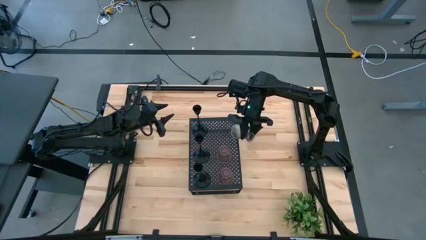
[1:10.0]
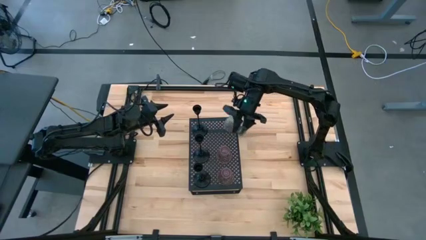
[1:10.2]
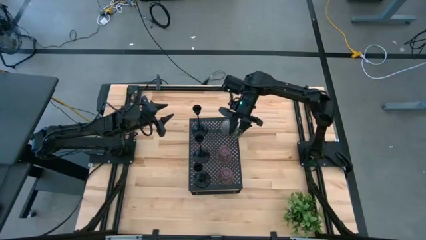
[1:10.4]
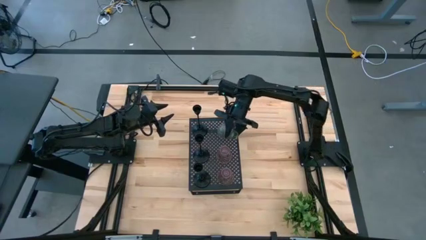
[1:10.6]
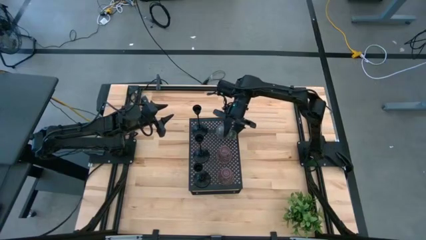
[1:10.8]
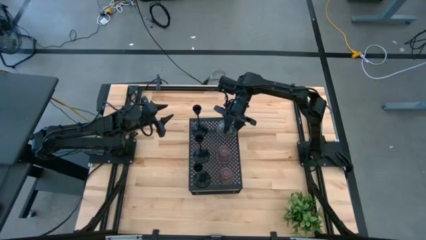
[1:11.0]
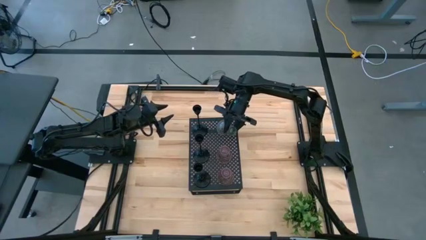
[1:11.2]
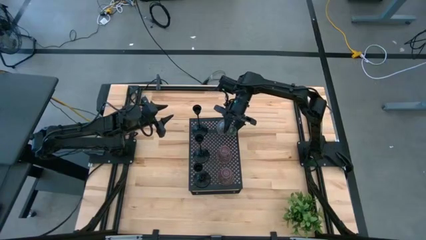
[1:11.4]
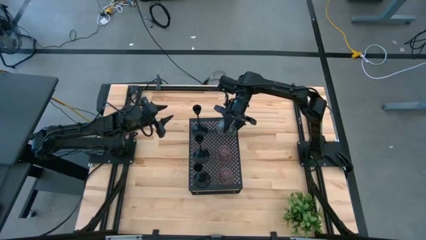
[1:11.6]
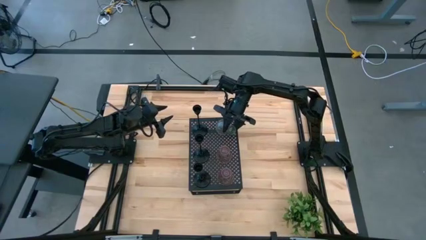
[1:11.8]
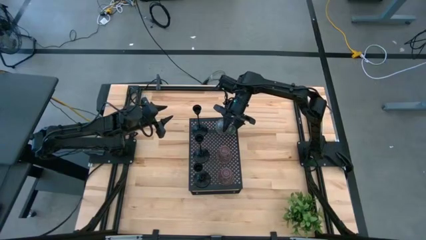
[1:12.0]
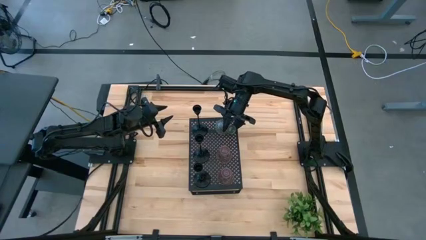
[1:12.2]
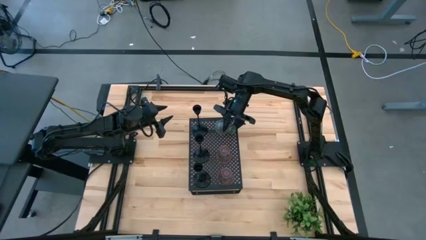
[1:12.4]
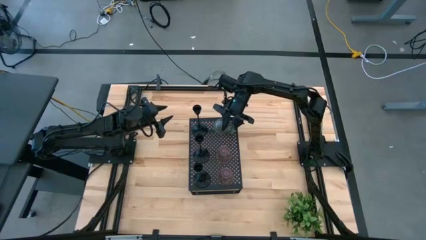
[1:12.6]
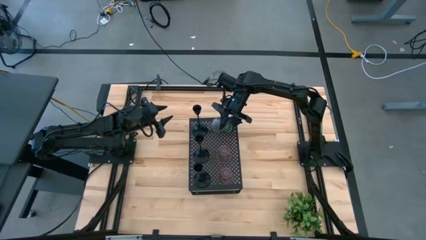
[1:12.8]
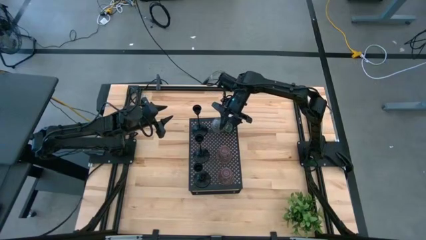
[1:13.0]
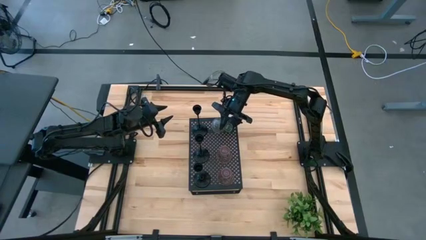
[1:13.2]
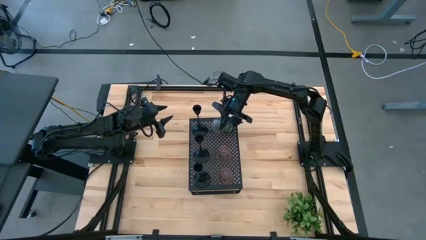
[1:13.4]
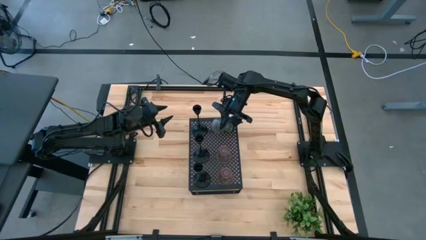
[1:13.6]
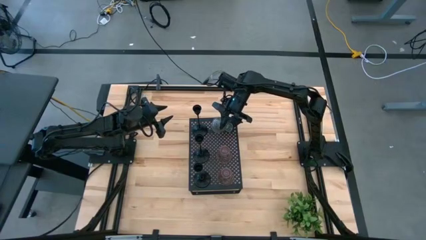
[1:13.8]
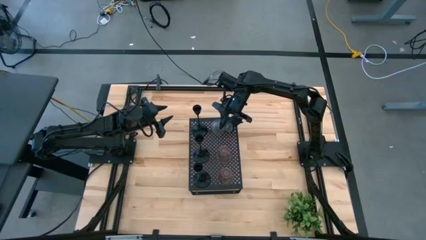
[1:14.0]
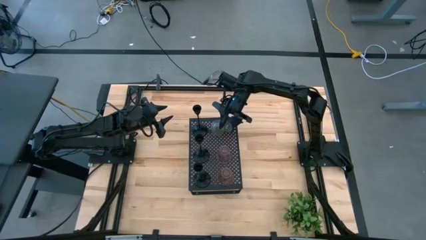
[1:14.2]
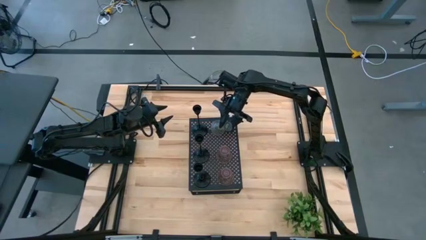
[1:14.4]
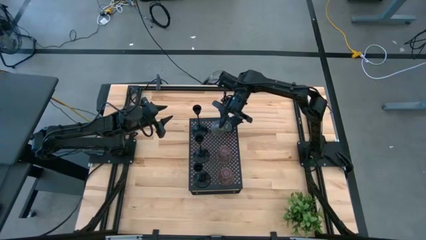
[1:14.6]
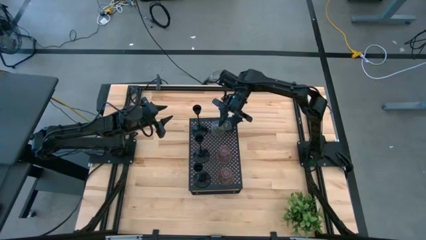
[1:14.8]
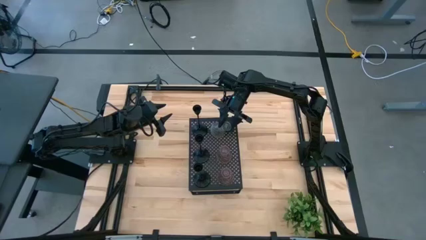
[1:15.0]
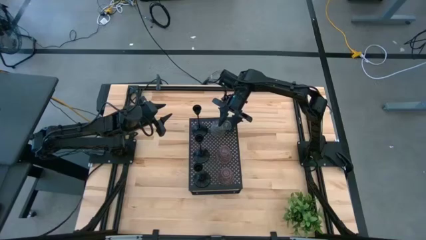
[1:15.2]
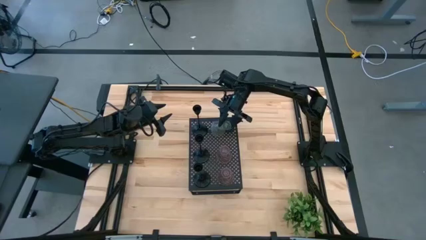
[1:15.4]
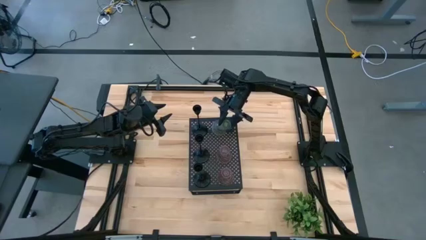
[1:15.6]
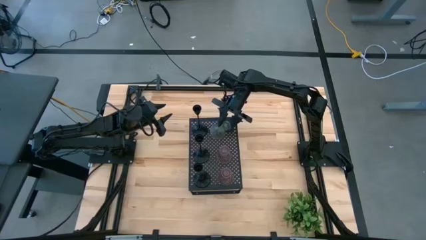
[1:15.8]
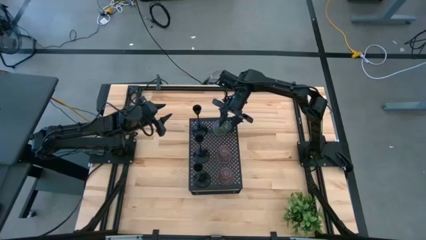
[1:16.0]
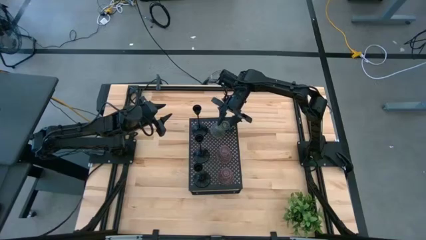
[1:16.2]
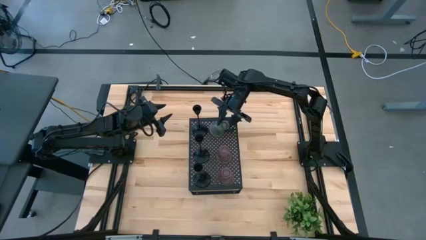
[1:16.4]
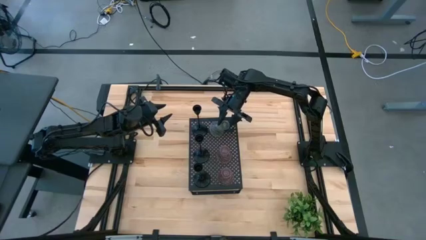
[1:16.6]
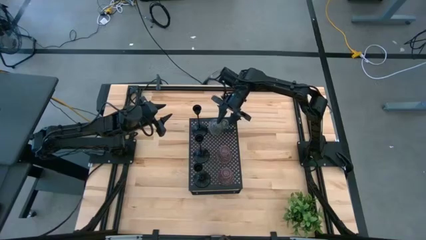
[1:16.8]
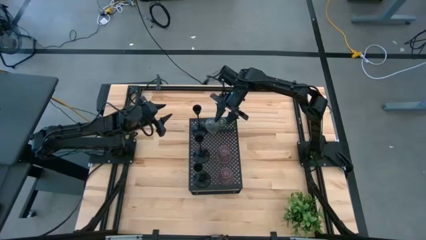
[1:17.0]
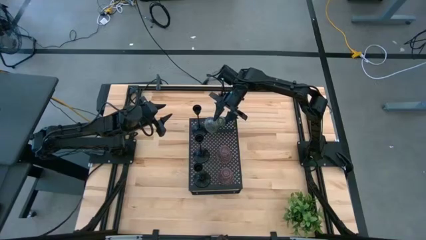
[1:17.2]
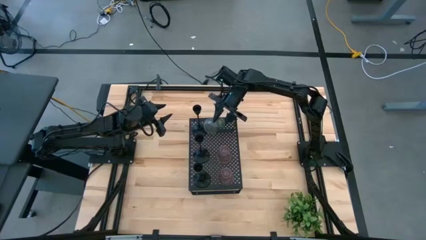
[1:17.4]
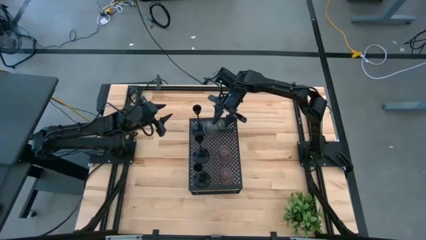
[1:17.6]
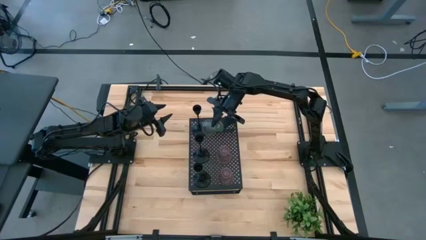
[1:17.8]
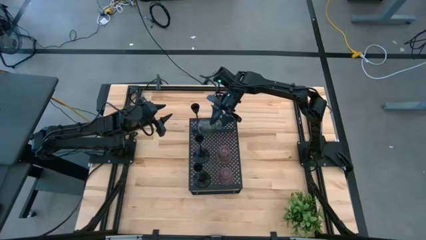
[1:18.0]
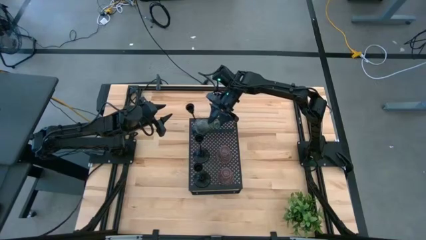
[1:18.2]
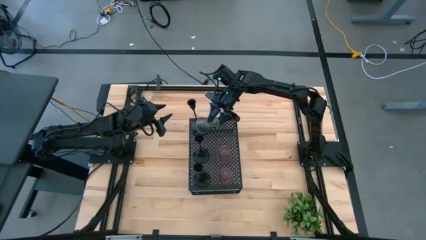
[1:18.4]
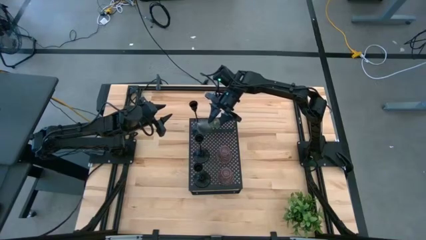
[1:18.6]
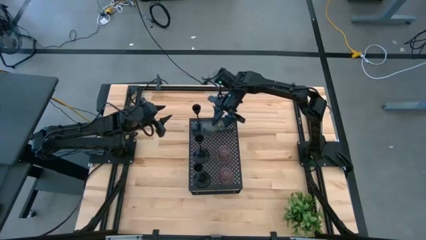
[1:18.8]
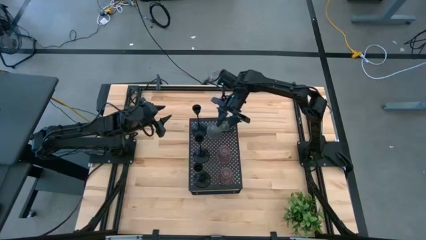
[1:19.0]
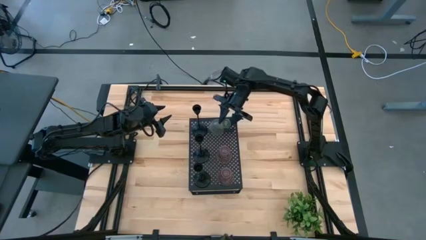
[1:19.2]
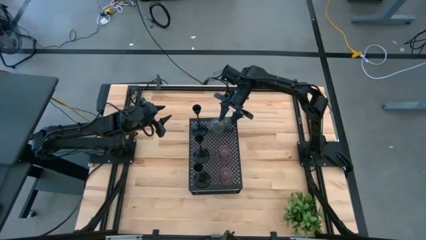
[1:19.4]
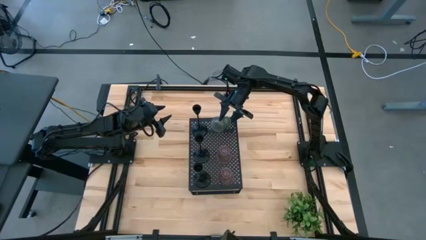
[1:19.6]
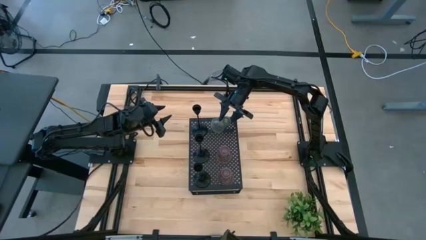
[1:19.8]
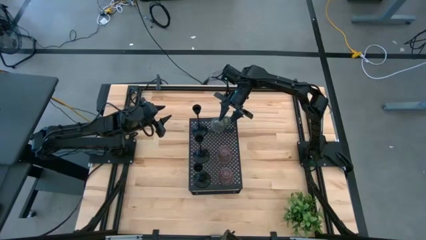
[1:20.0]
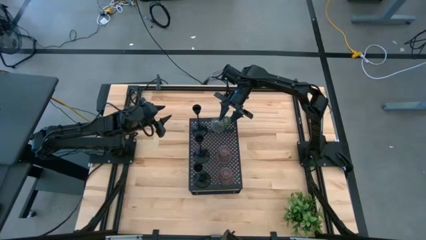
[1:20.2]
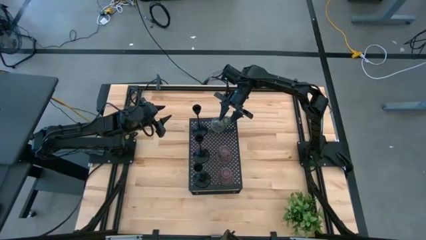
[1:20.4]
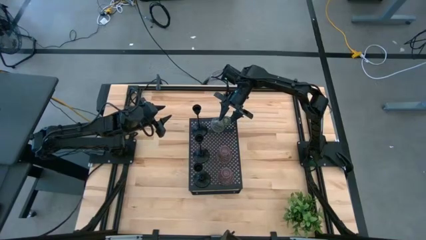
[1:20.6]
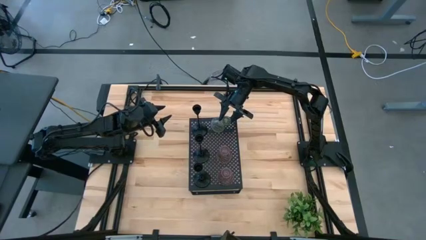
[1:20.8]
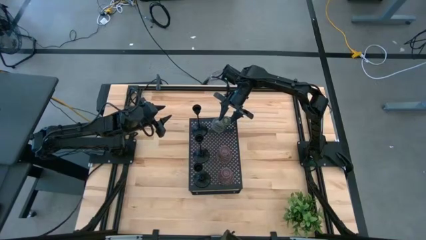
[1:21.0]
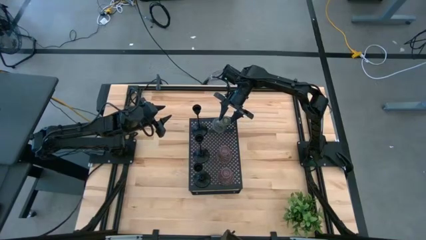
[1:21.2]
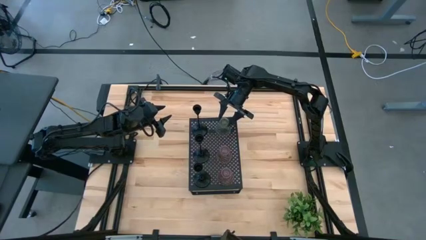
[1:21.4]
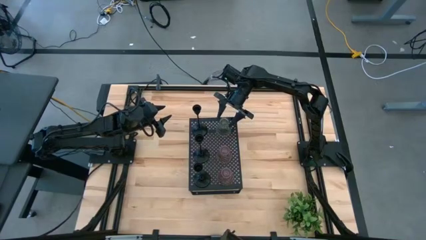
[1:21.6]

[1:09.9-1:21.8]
Task: Pick & Place candle stick holders
Put the green glass candle holder on the shelf

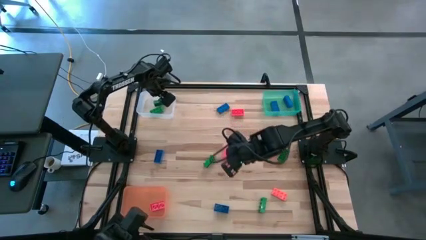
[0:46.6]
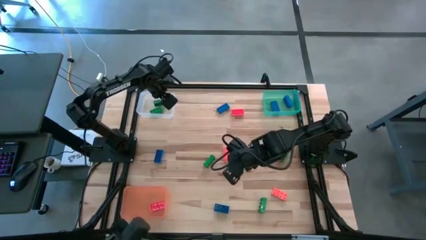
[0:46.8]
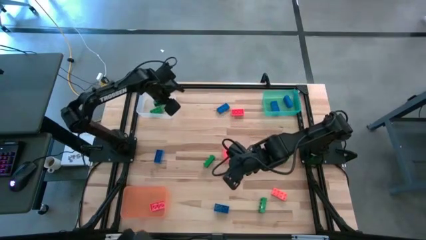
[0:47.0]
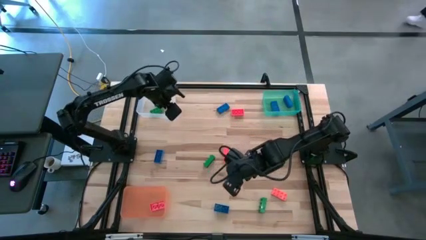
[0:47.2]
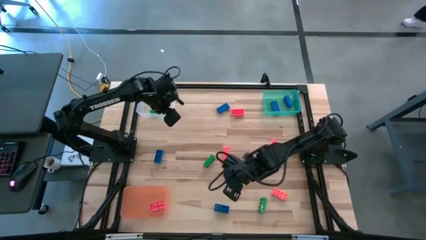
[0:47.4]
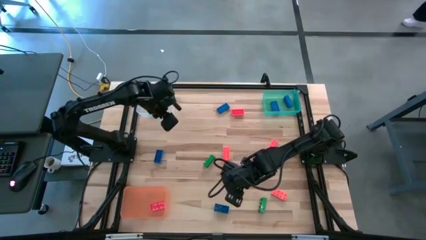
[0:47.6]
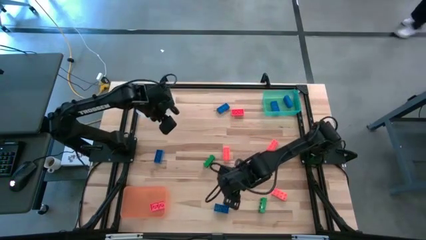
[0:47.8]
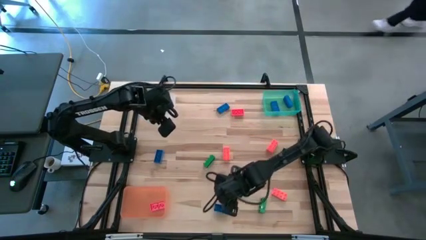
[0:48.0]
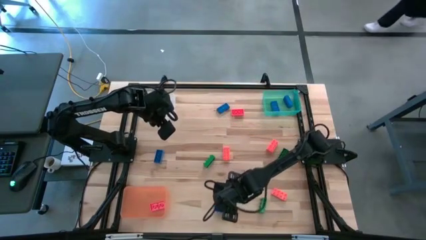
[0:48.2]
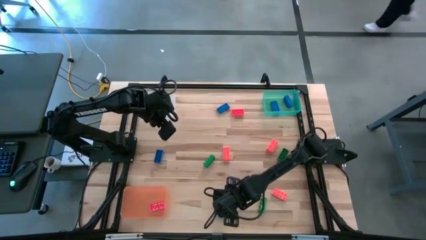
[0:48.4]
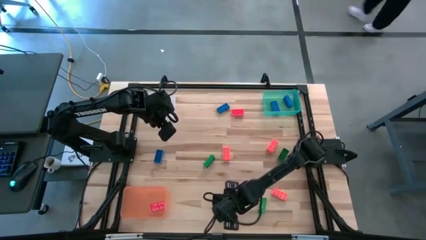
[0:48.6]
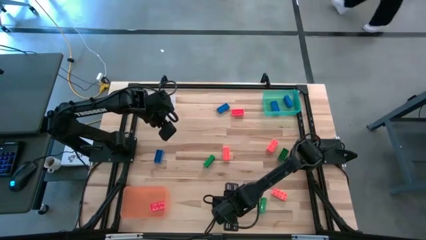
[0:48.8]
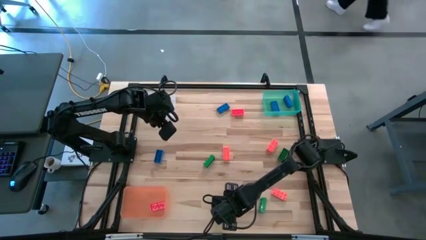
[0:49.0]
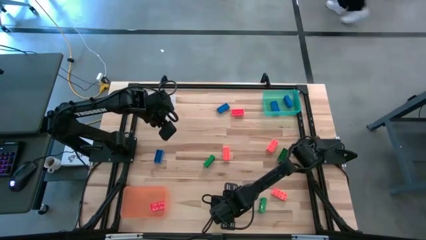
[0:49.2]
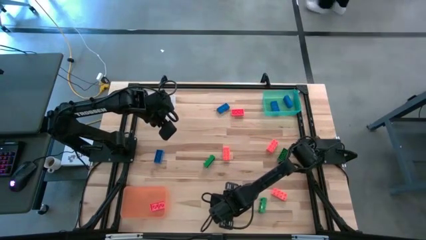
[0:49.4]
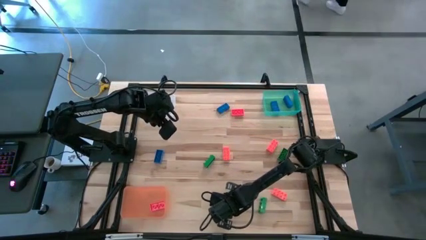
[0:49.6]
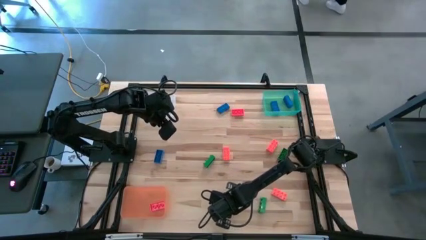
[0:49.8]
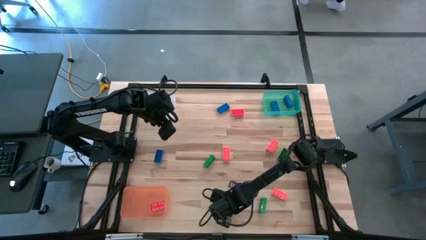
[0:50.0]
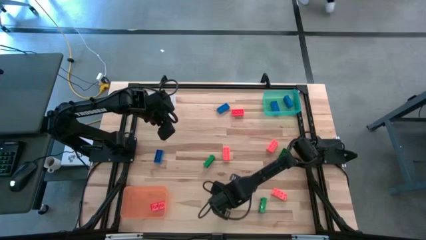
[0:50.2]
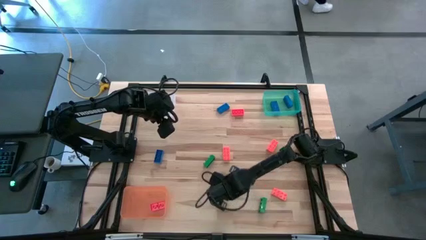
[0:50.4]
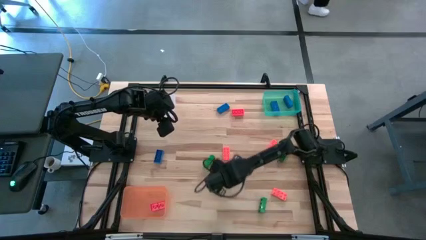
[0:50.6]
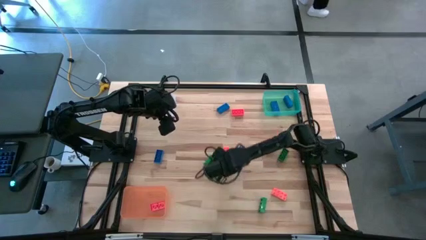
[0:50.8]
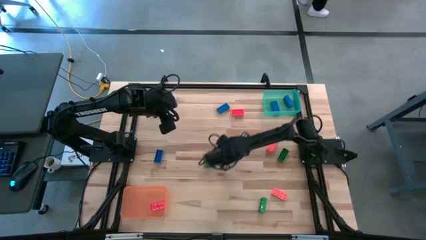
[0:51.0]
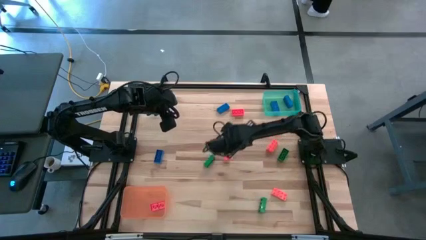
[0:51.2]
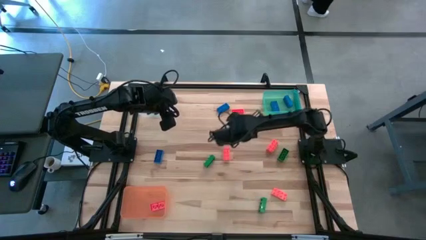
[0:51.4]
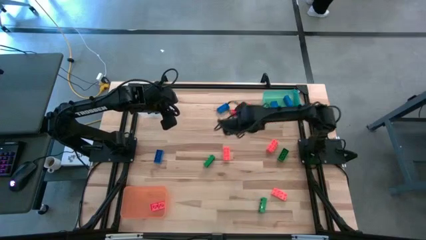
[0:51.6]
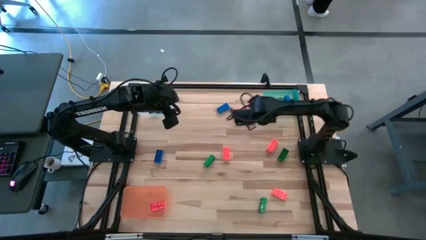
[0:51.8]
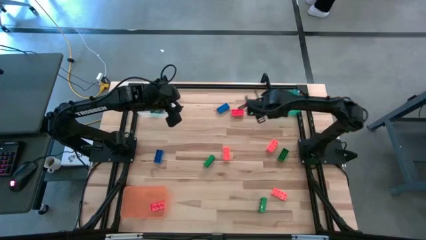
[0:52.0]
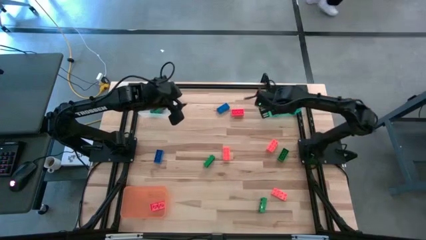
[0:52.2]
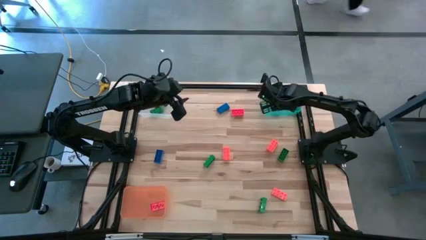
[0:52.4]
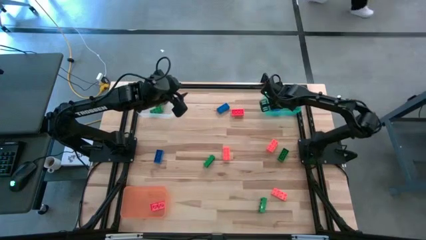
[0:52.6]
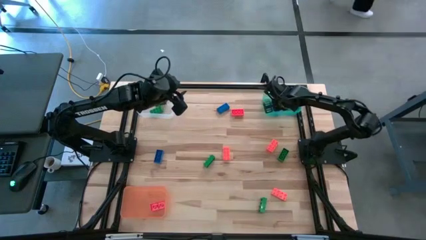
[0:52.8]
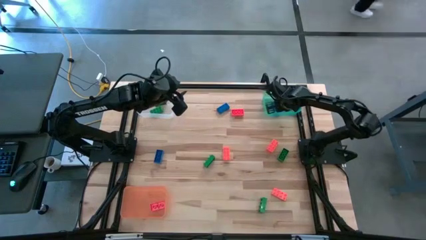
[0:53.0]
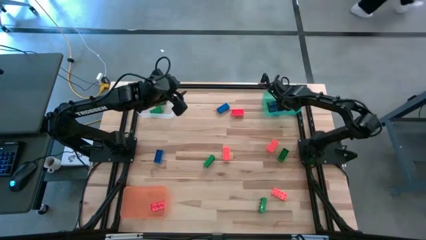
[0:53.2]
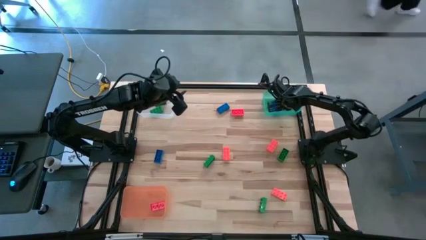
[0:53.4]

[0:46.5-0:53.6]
Task: Sort & place blocks by color
Put the blue game piece into the blue bin
